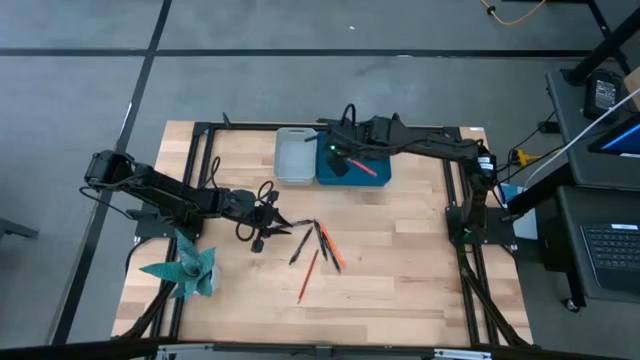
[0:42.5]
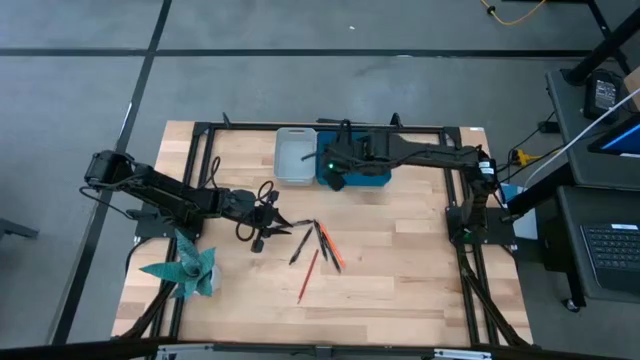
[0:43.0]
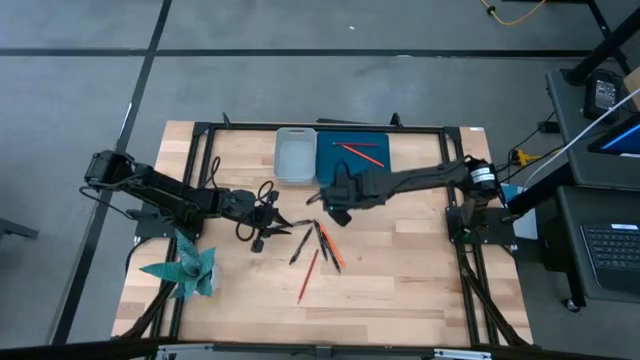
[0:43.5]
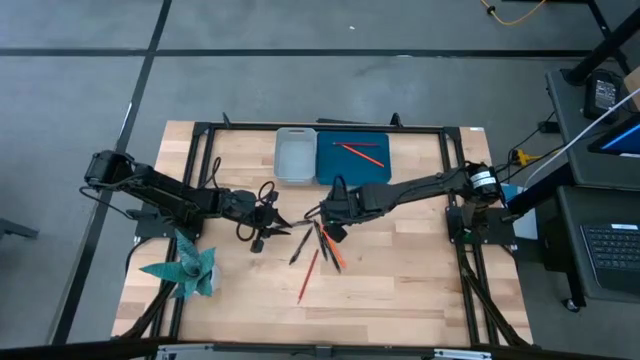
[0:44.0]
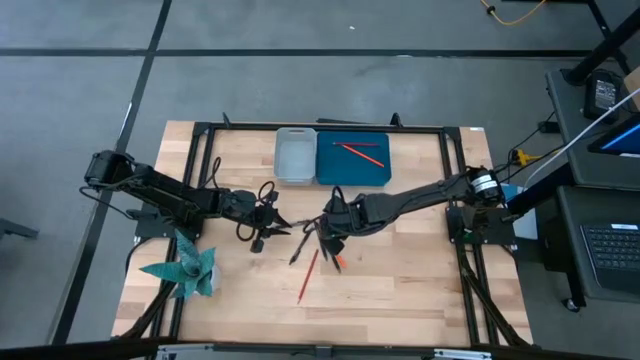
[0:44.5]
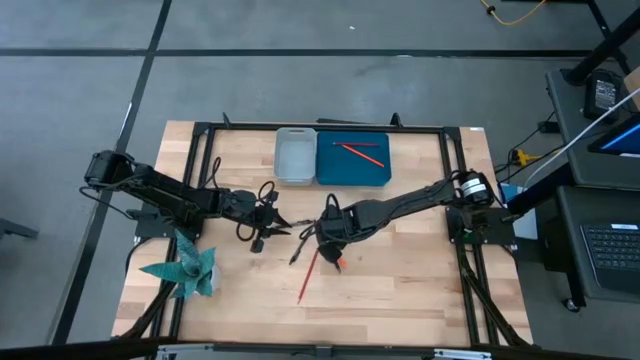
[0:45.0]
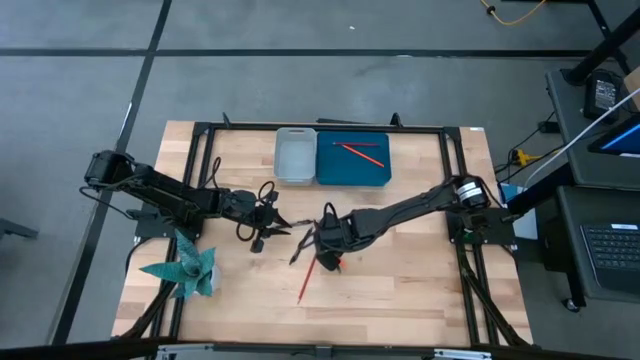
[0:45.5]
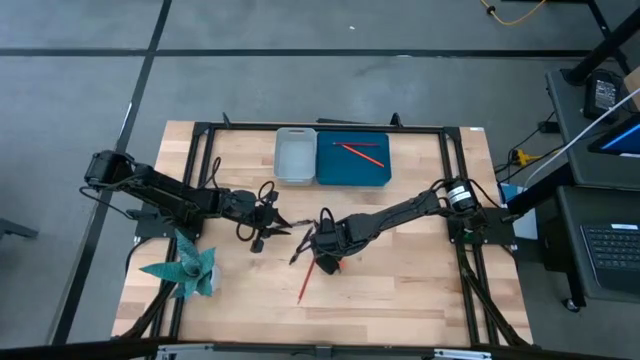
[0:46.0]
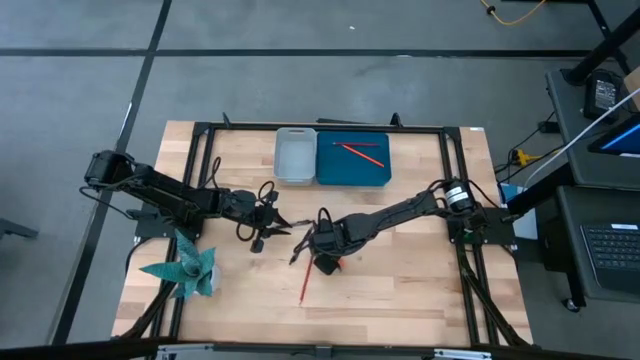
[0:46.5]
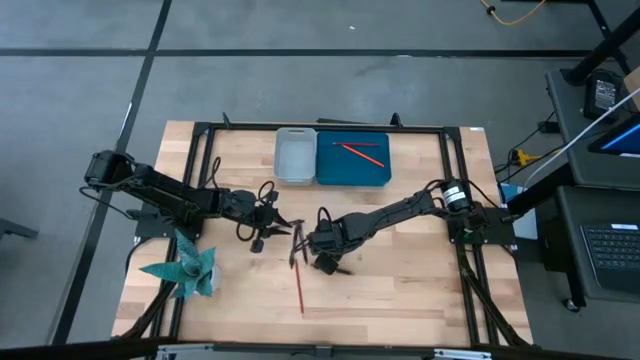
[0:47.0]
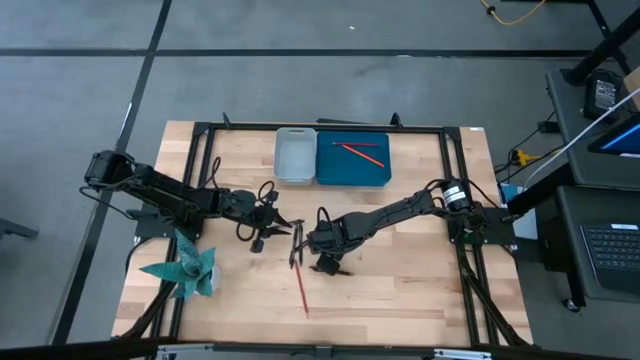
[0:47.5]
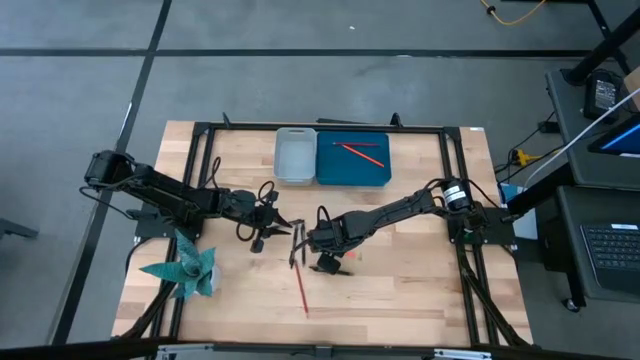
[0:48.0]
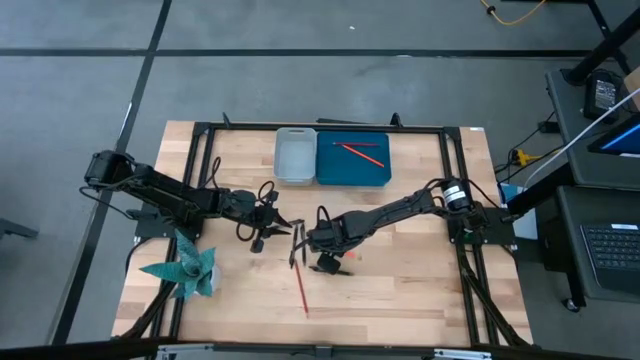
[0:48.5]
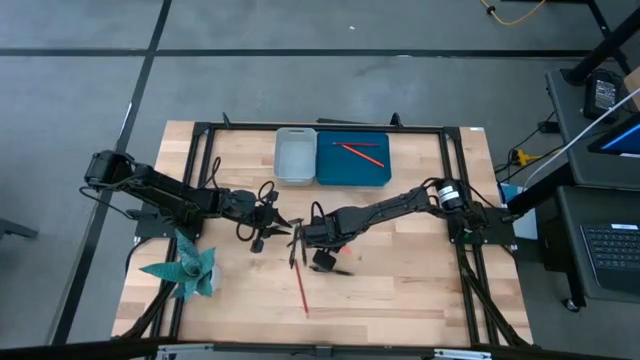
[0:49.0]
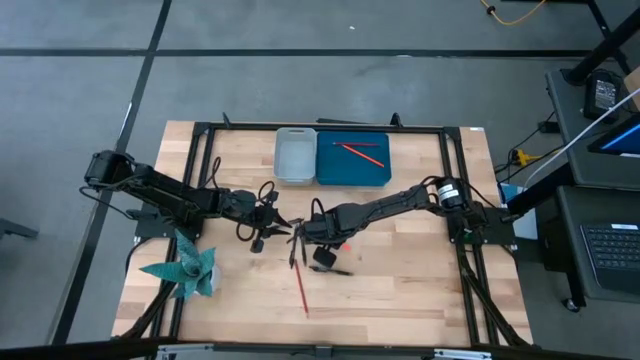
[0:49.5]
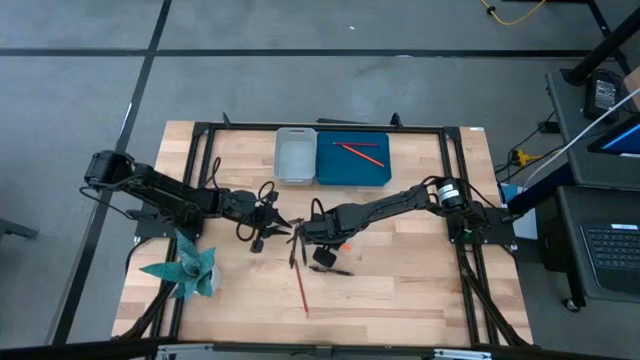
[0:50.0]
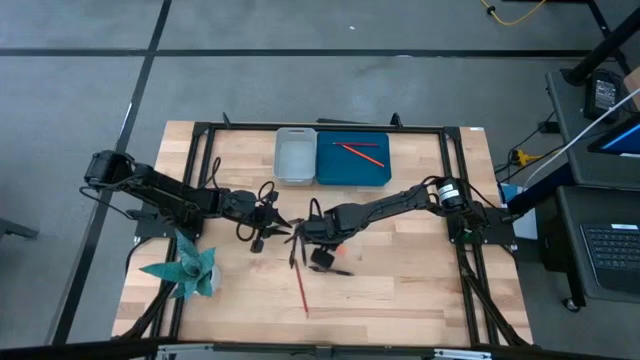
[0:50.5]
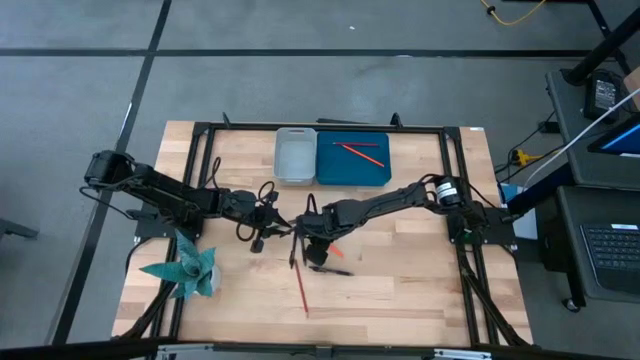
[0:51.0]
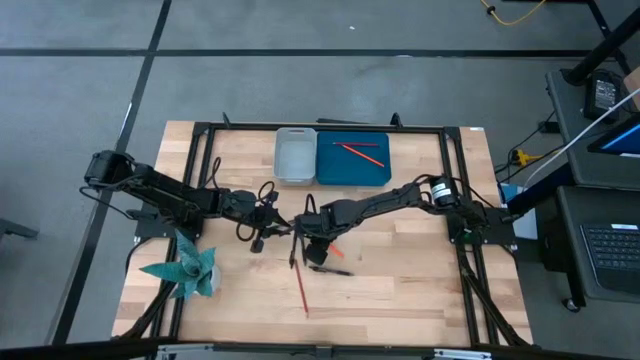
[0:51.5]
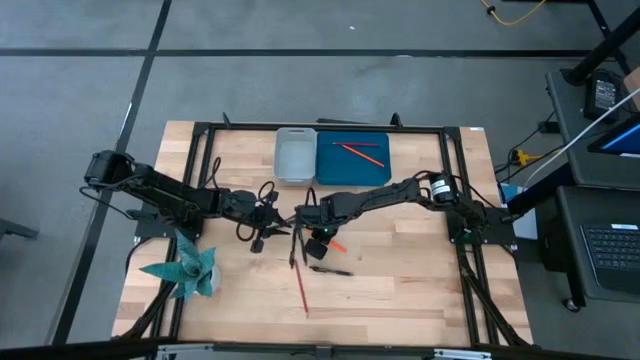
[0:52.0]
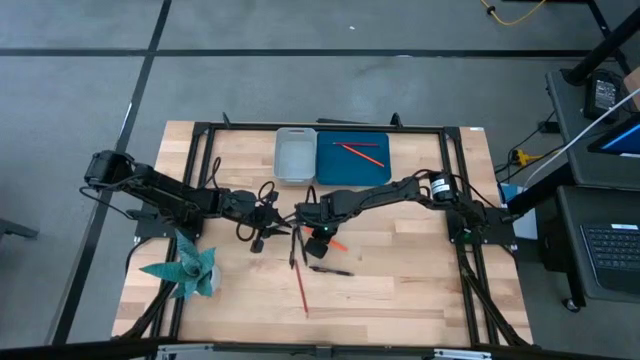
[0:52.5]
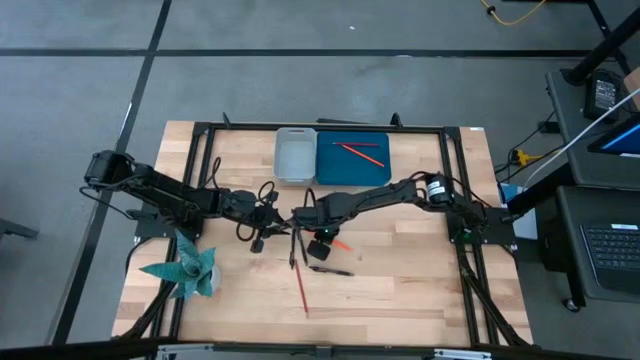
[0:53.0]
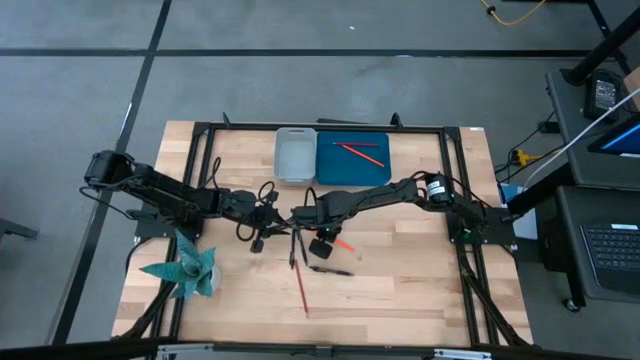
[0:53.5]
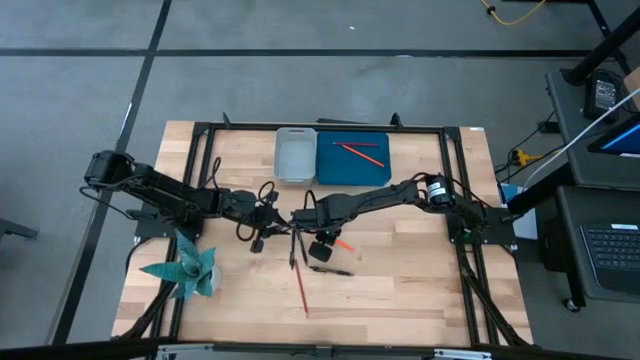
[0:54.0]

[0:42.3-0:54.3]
Task: Sort pens & pencils
Put the right orange pencil into the blue bin

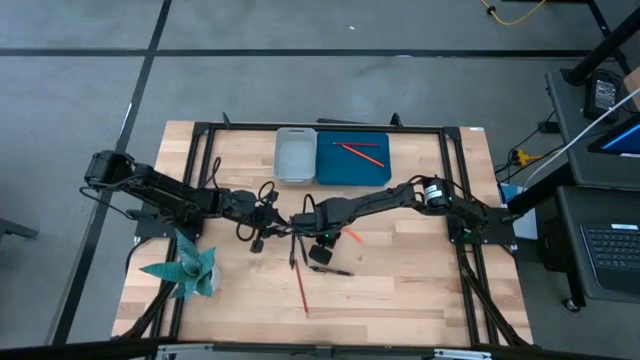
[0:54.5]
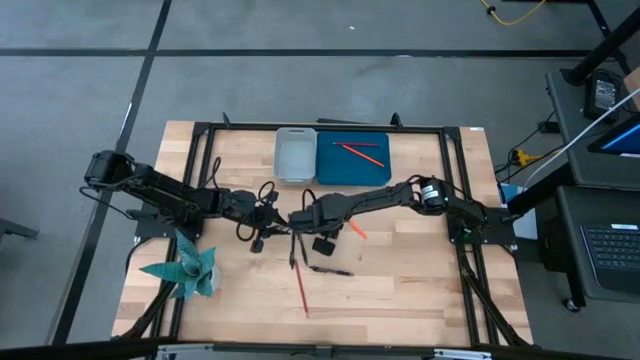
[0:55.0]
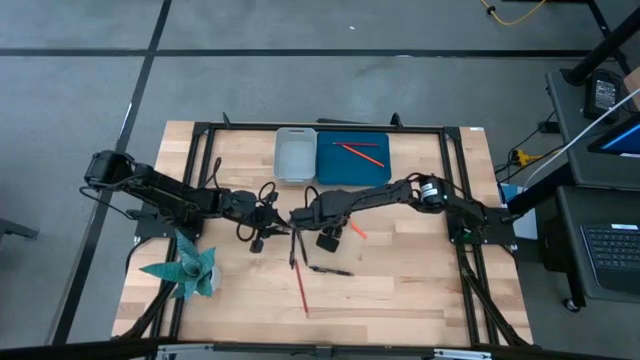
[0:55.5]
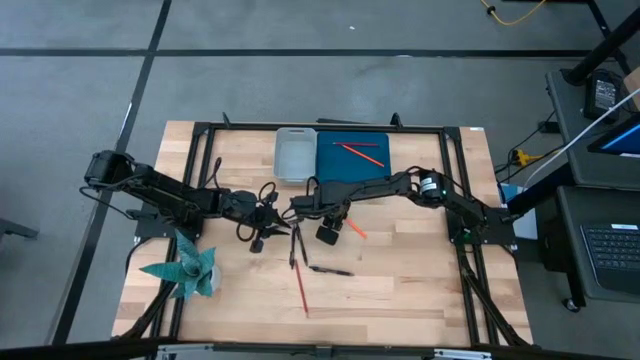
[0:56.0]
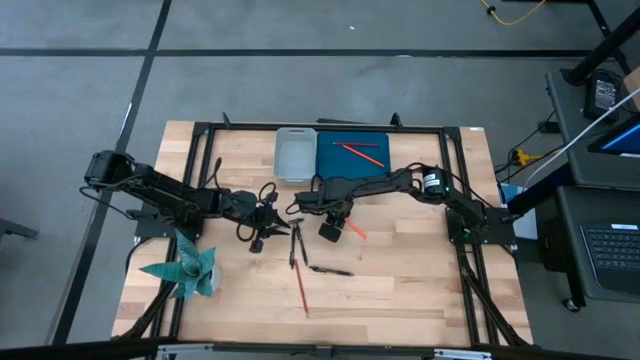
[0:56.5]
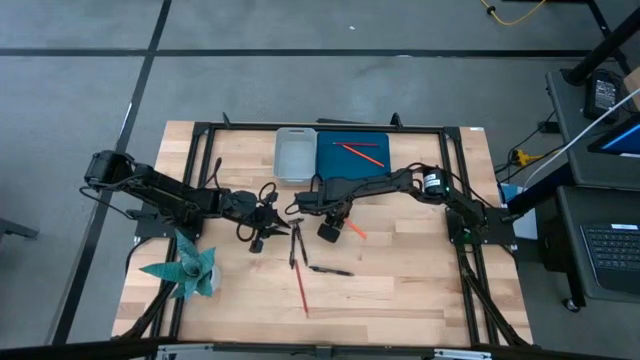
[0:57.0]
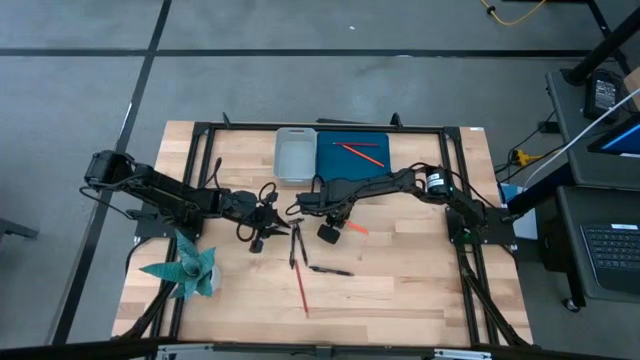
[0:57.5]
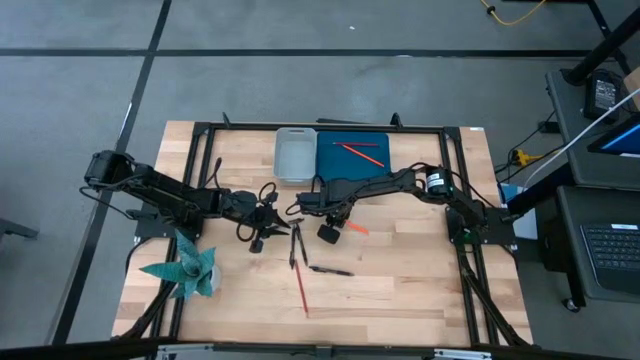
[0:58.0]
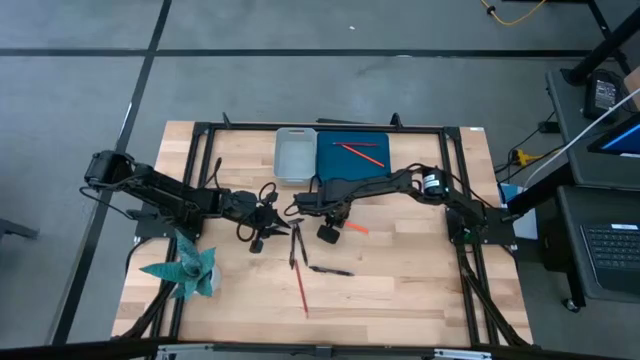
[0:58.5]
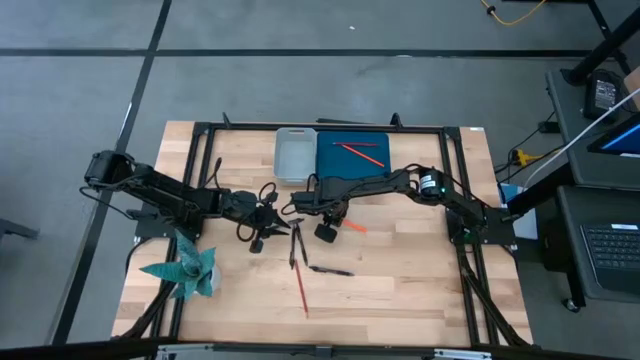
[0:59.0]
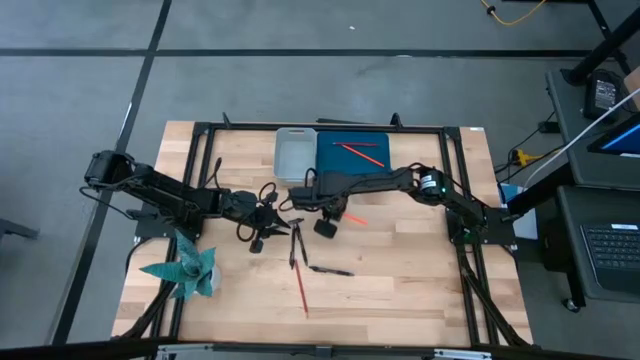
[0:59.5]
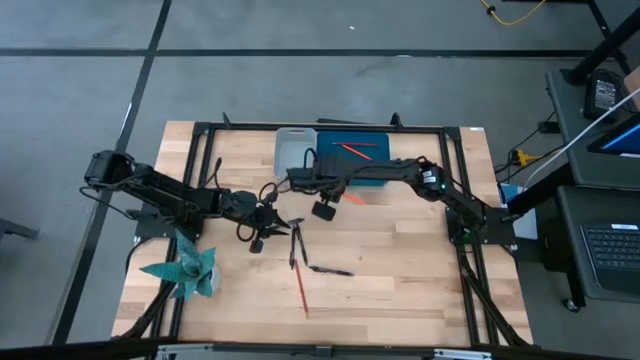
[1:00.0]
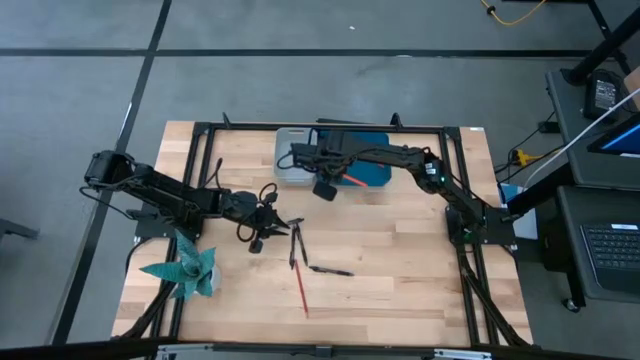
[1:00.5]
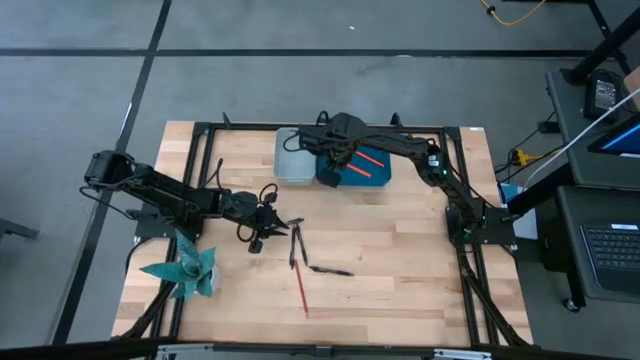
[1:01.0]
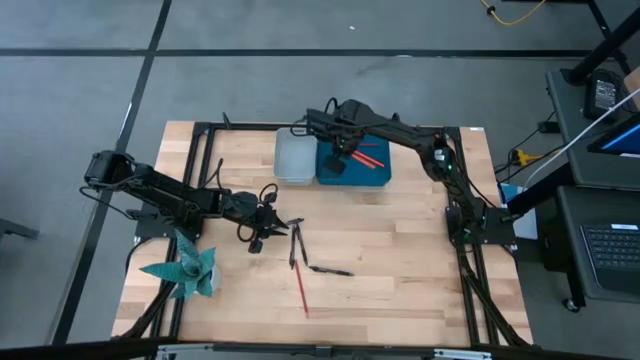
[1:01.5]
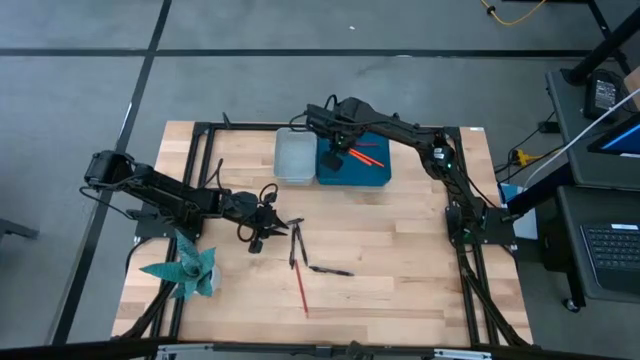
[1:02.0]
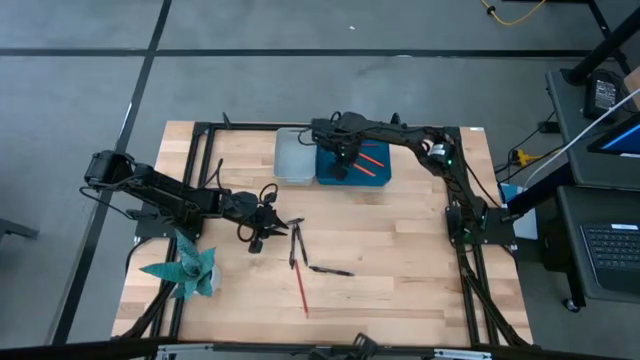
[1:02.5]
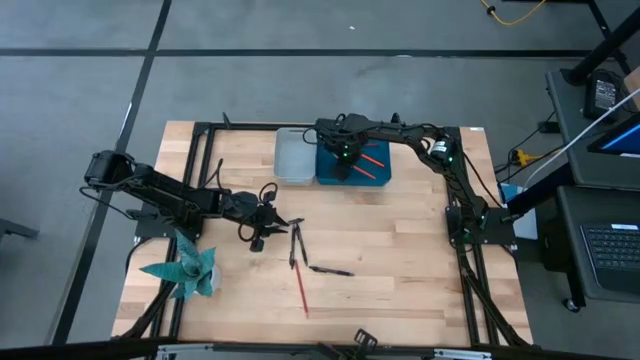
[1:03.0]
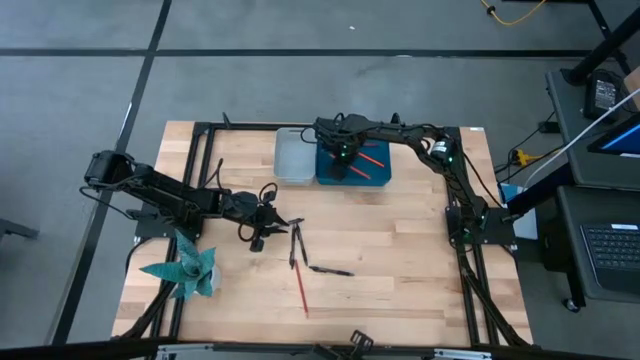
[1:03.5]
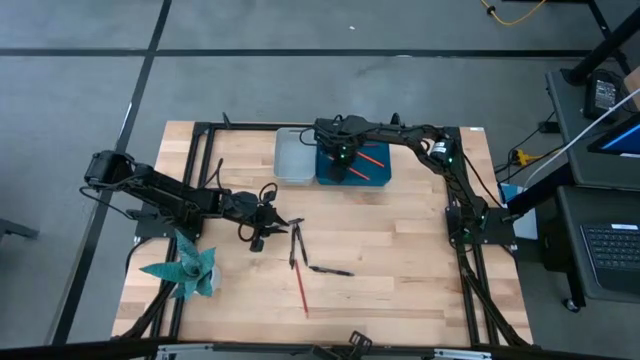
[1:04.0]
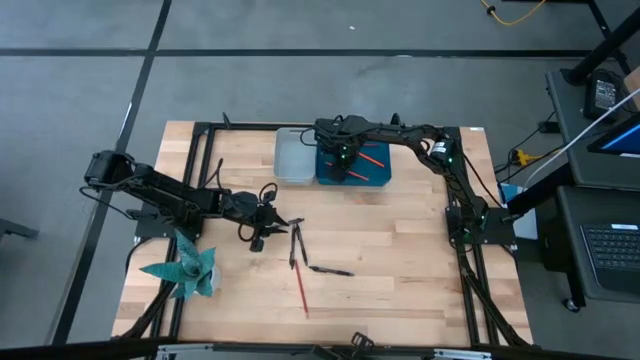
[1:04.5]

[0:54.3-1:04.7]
Put the orange pencil into the blue bin
